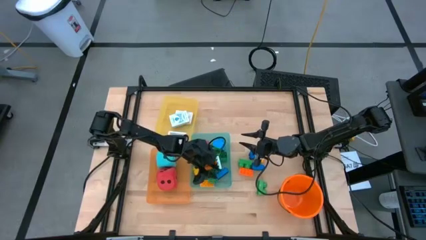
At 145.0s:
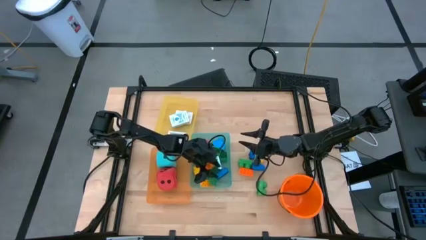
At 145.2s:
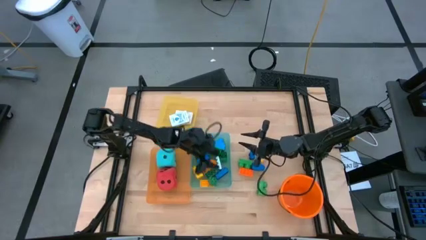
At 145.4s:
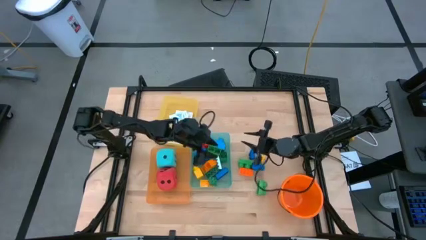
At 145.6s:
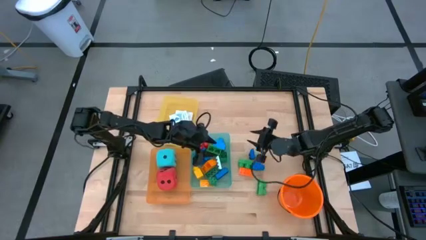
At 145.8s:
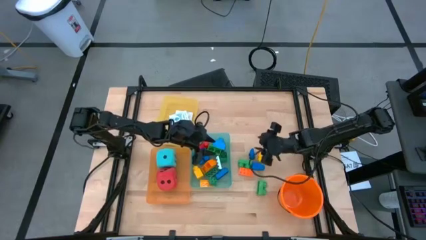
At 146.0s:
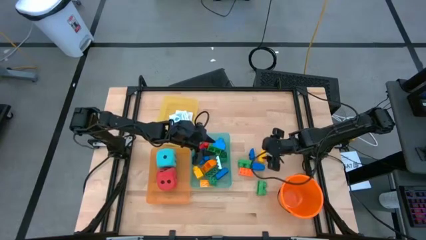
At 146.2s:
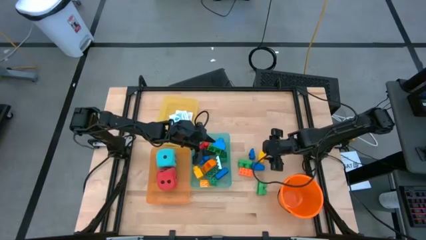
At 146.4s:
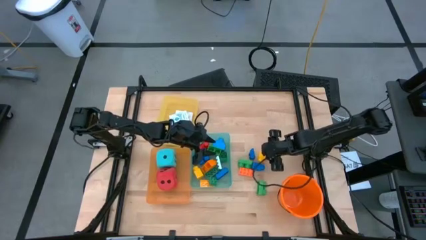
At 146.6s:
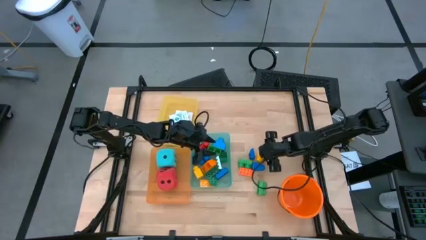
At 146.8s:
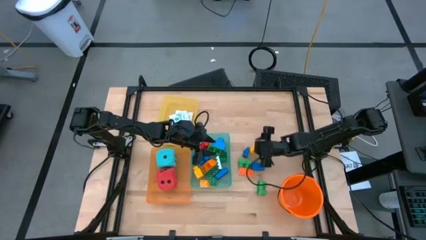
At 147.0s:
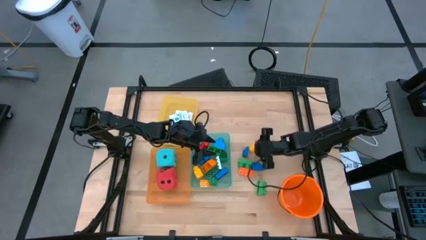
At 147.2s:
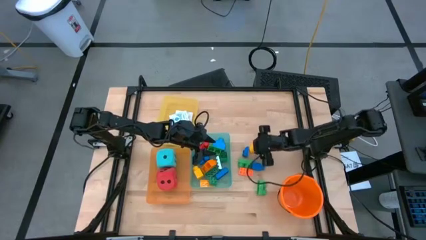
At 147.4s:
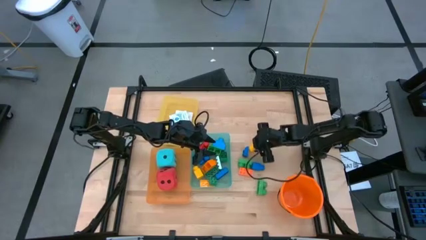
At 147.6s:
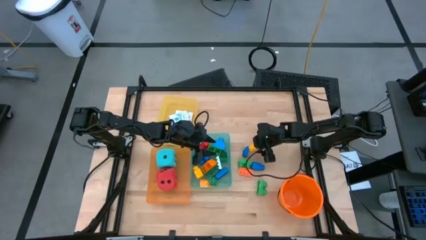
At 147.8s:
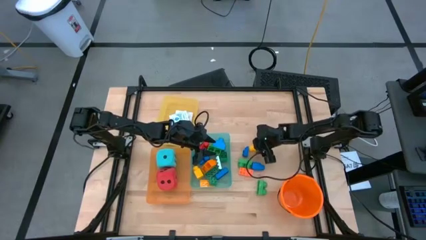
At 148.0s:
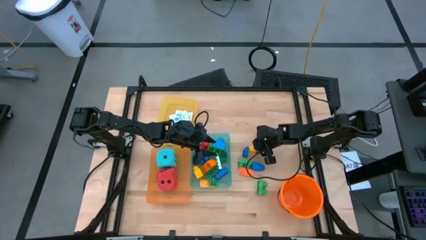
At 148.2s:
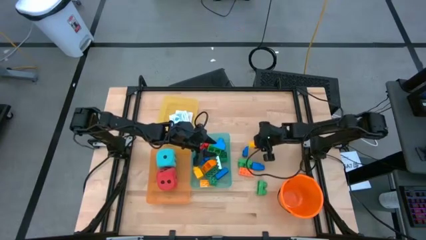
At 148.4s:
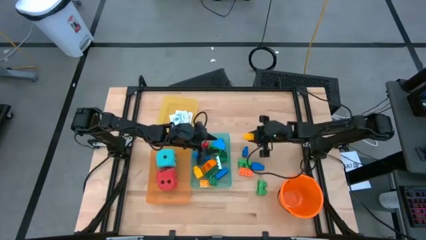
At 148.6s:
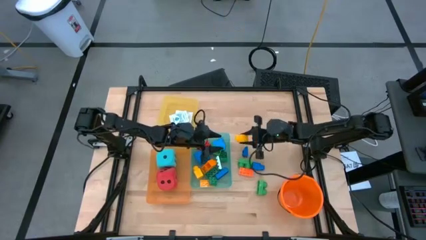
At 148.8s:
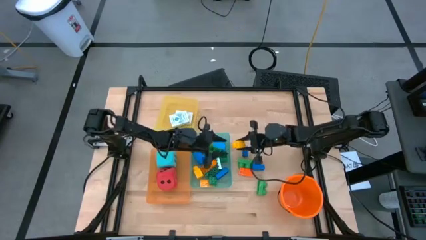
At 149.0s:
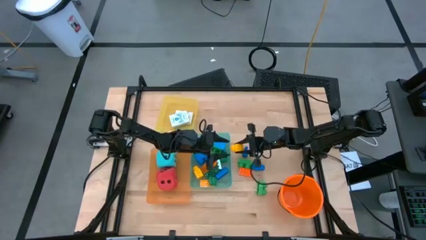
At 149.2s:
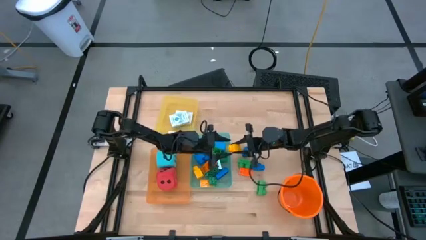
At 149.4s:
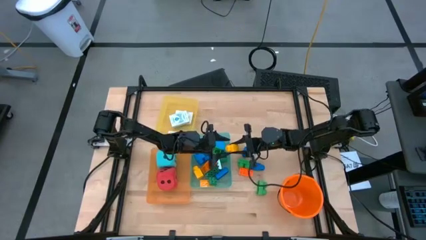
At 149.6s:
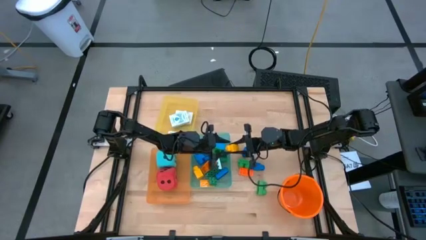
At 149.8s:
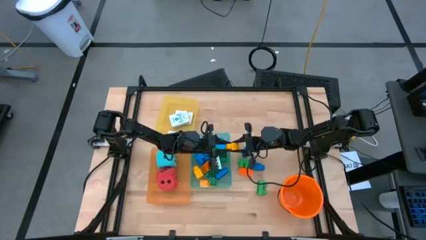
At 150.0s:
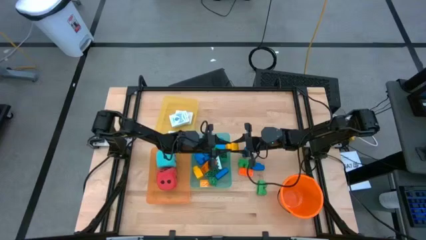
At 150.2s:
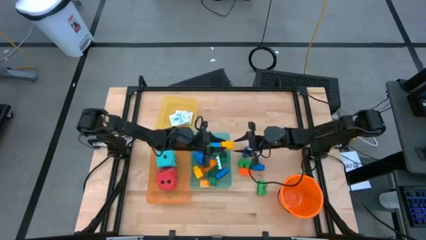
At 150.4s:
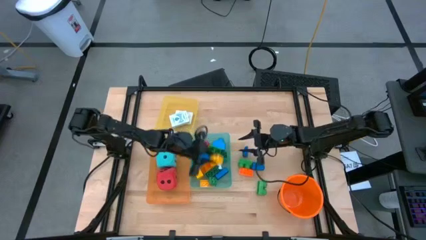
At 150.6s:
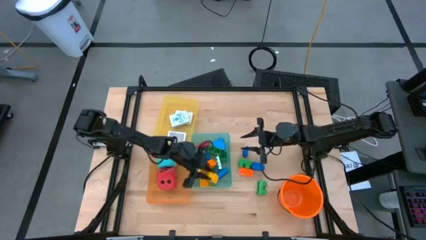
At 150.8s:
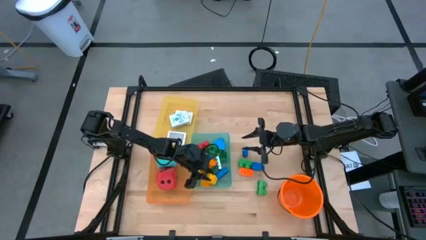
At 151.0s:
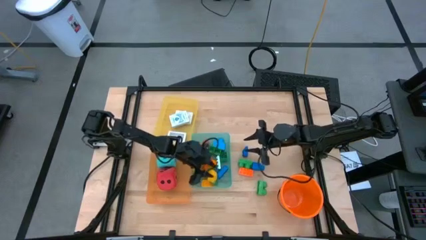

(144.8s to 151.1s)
Task: Pick & Place Toys
Put the yellow game piece into the green bin

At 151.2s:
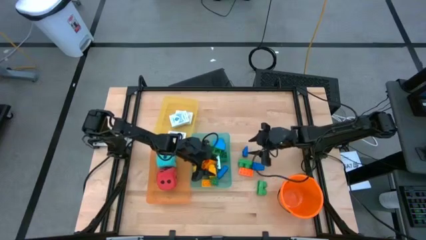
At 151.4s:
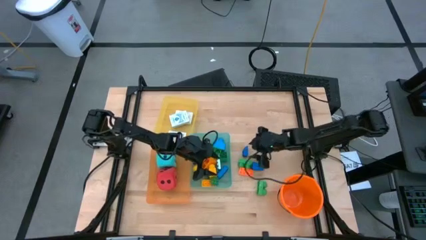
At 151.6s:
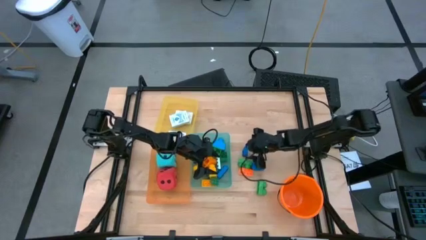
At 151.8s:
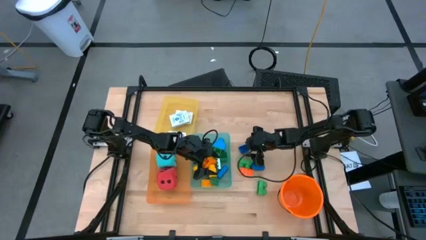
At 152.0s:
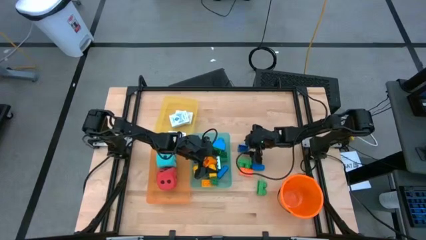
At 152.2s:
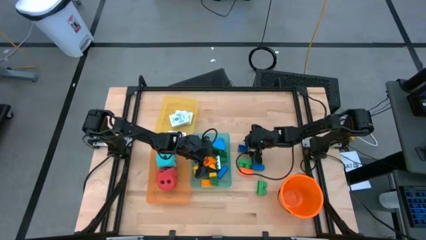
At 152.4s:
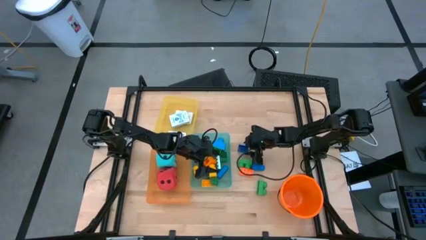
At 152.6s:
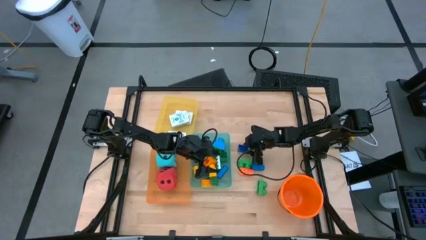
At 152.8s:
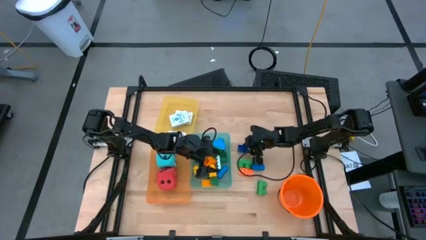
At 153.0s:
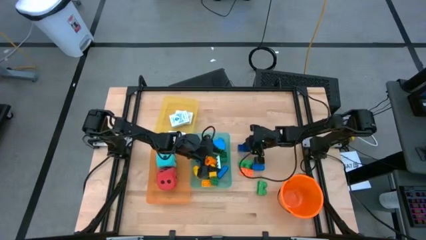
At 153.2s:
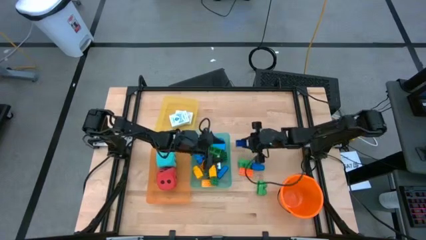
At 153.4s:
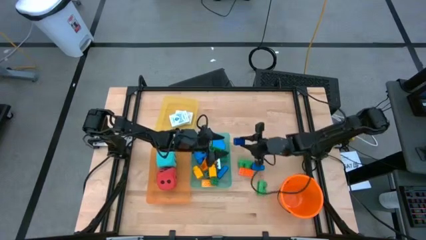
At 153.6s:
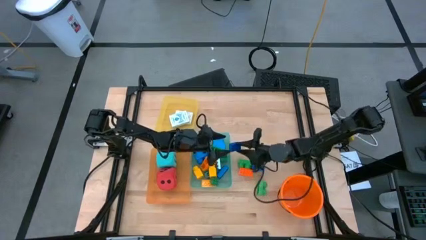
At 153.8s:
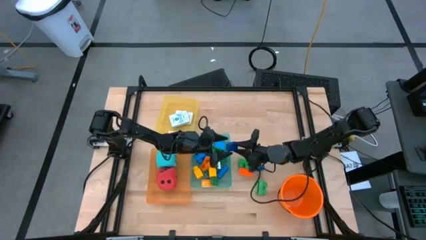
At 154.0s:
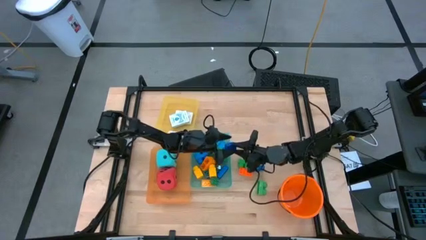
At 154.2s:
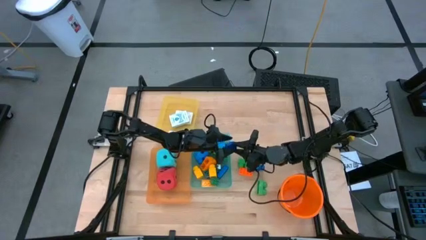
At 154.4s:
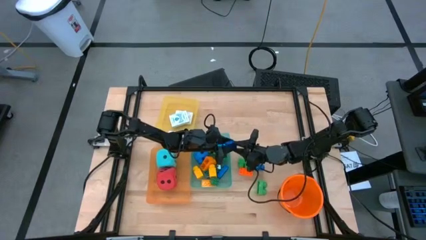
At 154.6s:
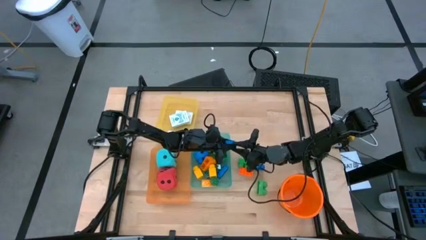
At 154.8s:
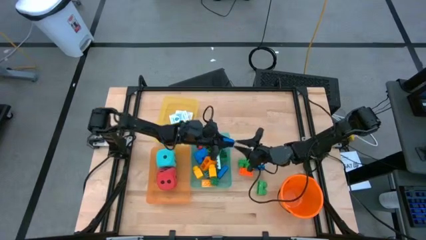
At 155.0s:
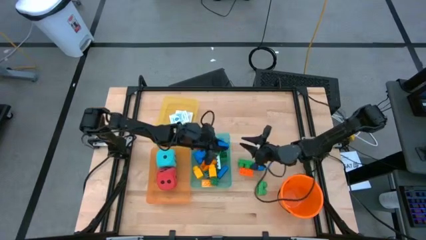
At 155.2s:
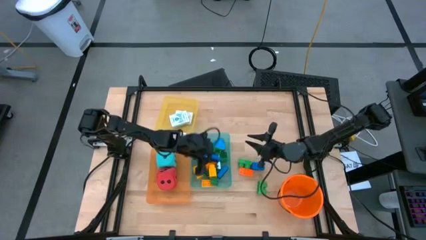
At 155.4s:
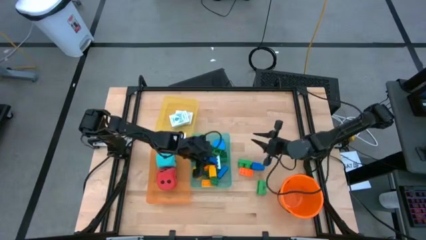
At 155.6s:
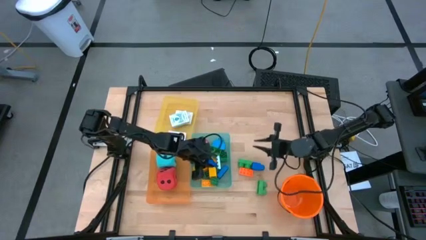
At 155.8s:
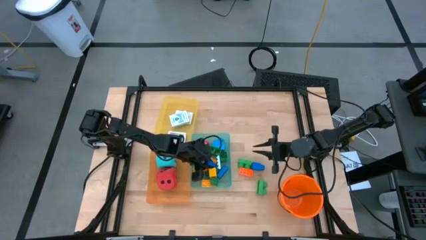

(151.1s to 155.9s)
Put the blue game piece into the green bin

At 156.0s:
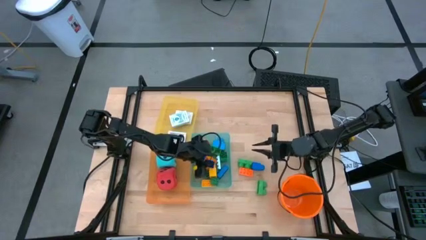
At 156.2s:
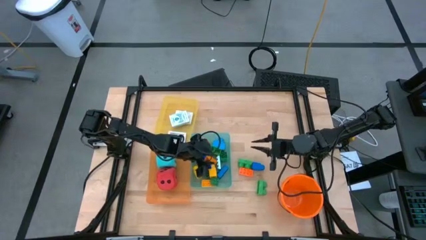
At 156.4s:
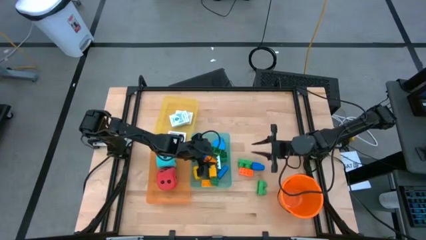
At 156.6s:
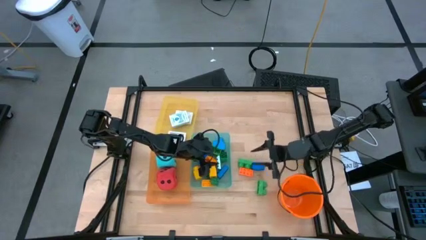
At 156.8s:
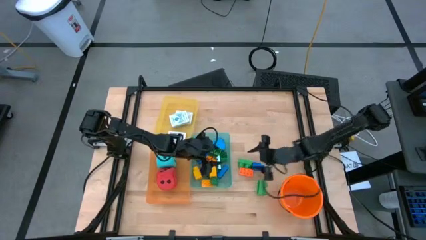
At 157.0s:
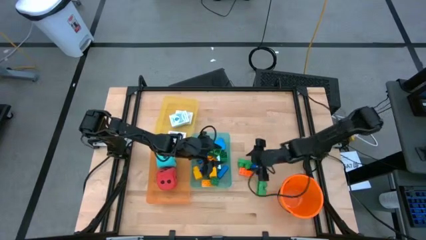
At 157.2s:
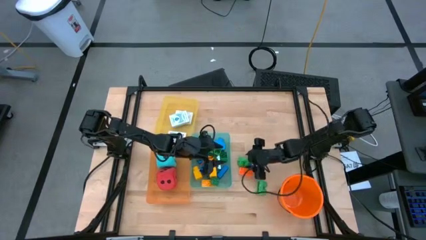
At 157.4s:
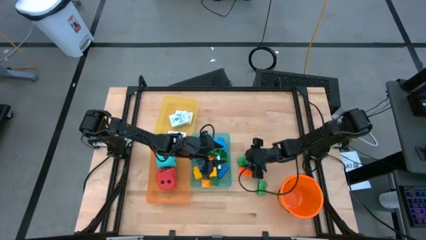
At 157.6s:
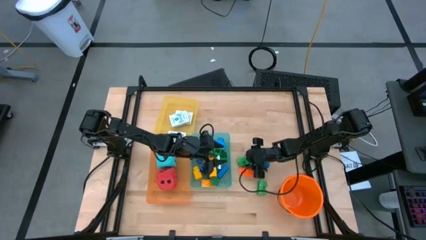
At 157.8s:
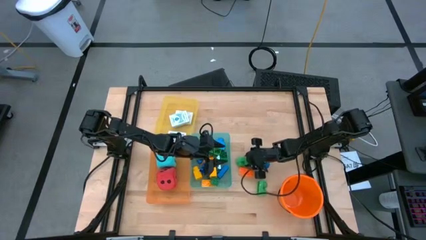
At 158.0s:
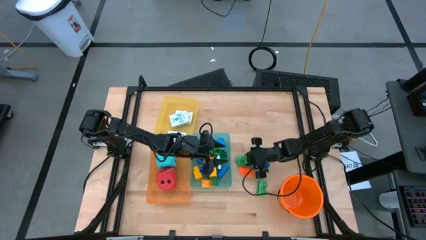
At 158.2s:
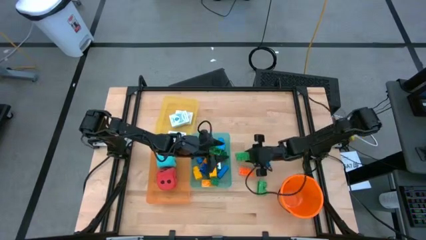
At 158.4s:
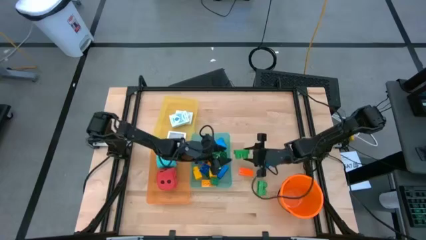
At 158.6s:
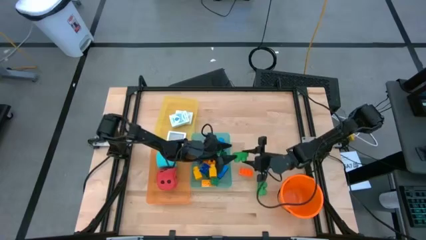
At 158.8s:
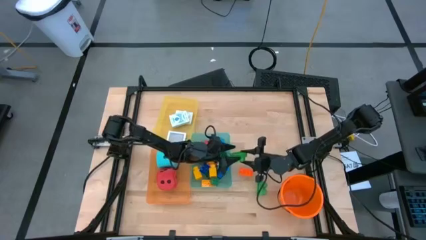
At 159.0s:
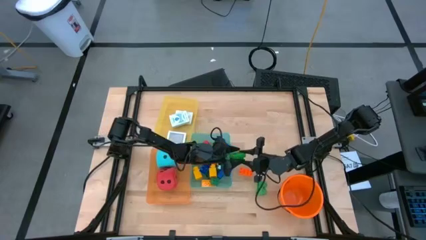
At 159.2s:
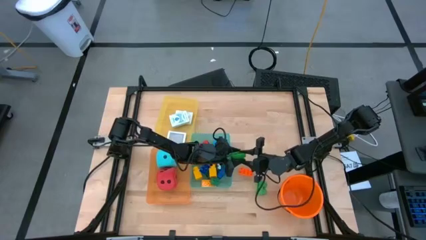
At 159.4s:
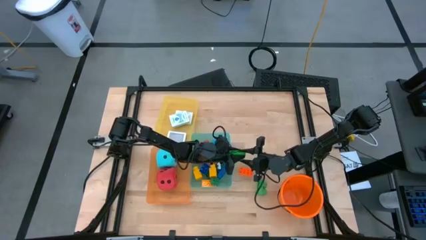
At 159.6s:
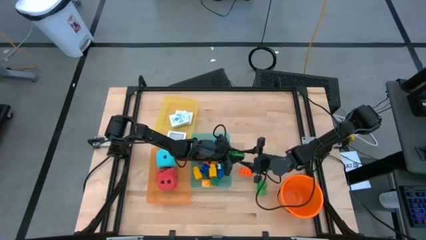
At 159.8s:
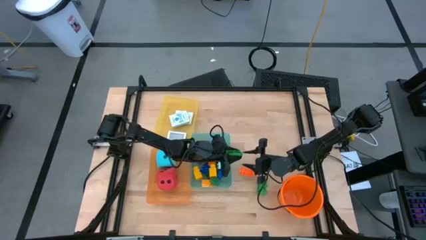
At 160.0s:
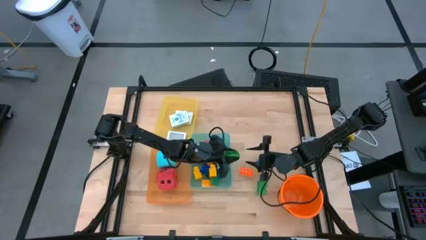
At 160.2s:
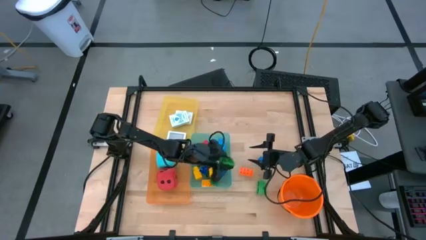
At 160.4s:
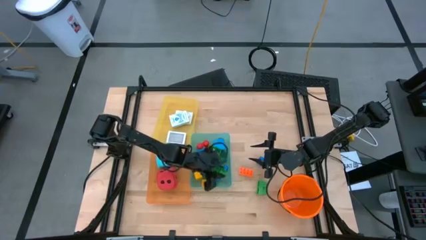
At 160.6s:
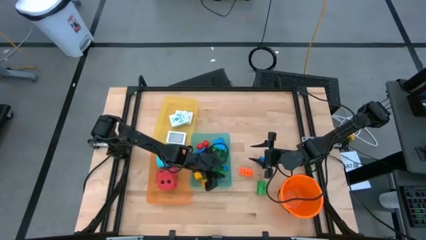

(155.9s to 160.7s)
Put the green game piece into the green bin

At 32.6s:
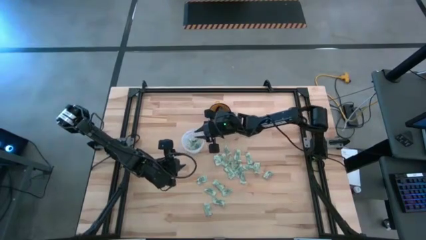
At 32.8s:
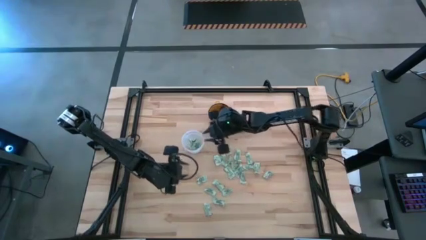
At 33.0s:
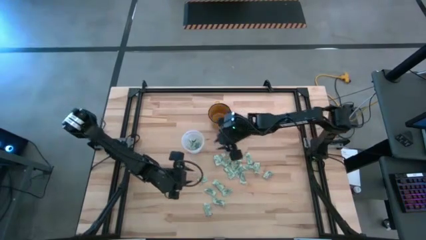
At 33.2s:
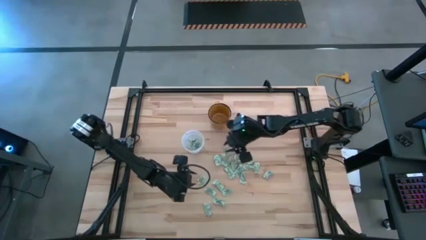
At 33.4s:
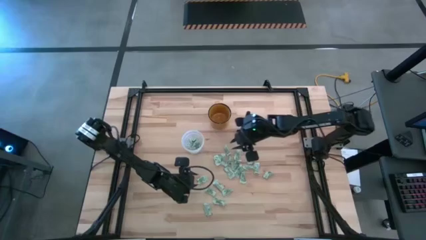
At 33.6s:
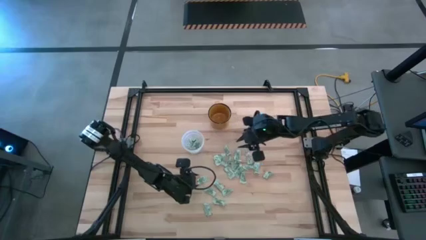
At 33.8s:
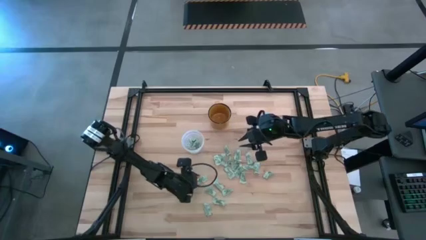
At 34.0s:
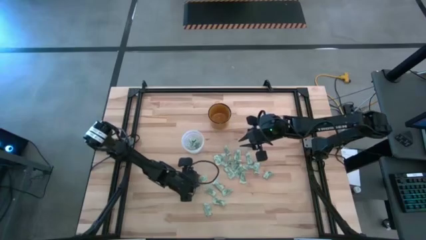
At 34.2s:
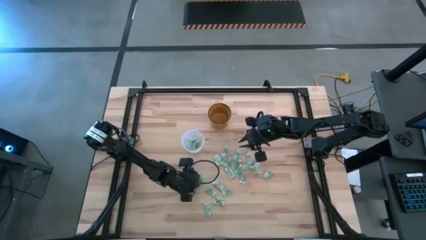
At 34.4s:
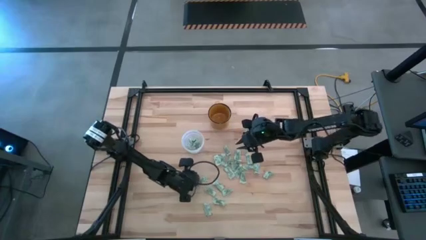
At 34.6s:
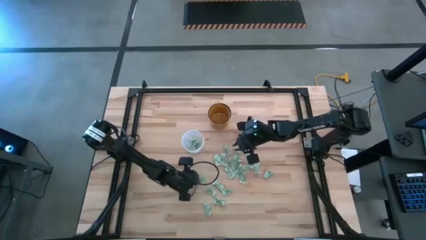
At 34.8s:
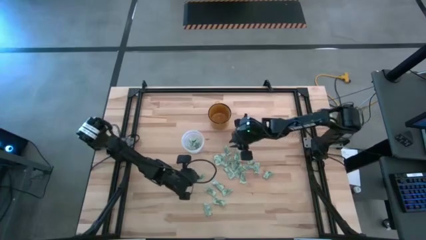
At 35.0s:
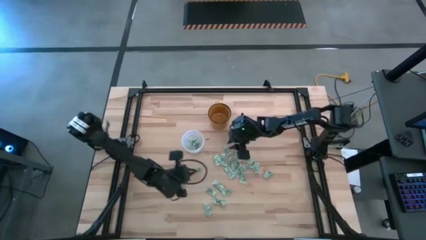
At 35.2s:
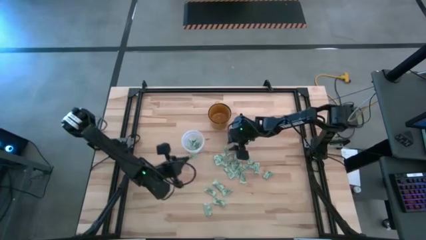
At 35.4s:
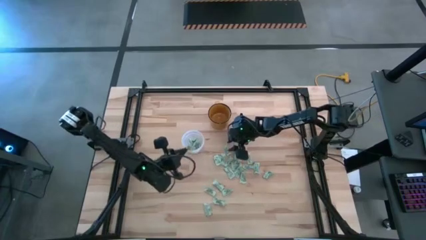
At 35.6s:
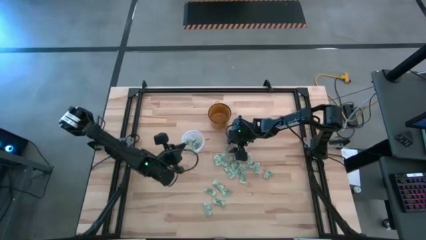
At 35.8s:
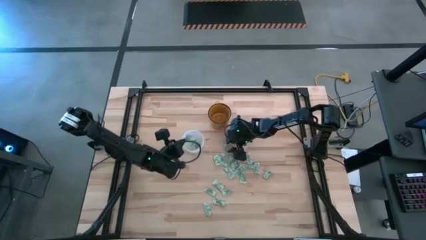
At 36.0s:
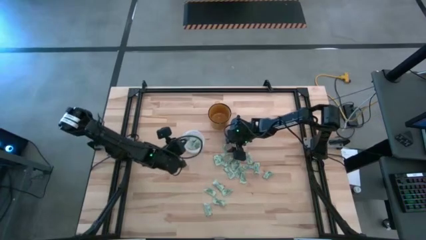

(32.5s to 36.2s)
Task: Pick and place Stevia / Truvia into bins
Put the stevia packet into the transparent bin
